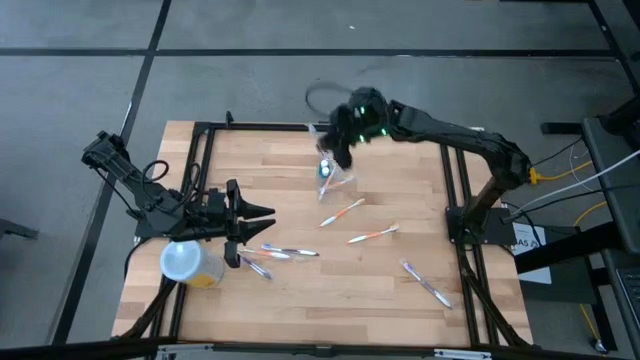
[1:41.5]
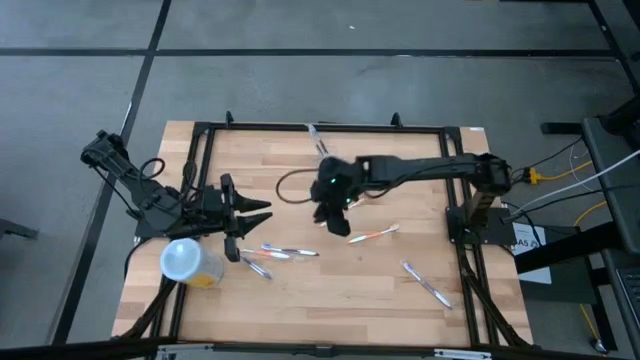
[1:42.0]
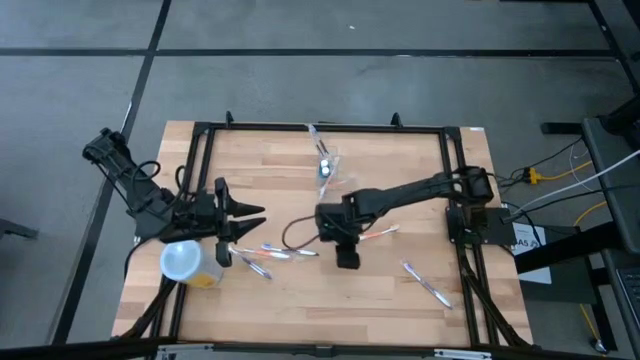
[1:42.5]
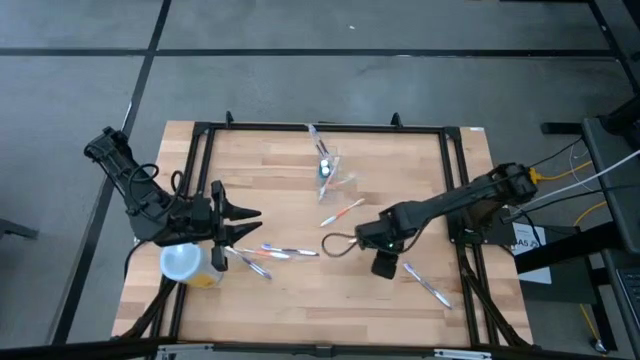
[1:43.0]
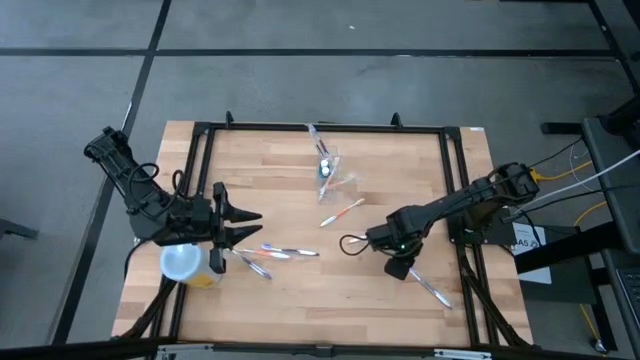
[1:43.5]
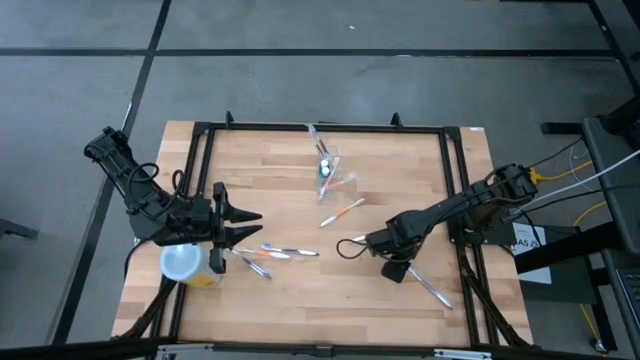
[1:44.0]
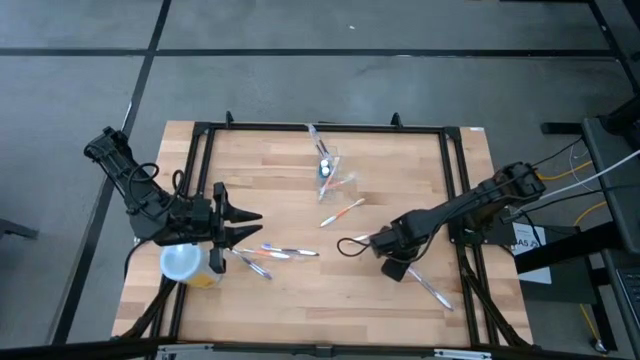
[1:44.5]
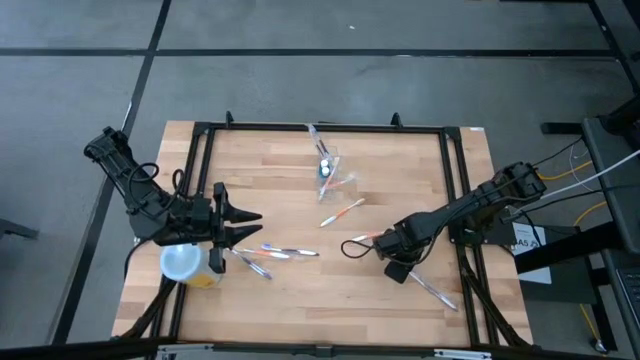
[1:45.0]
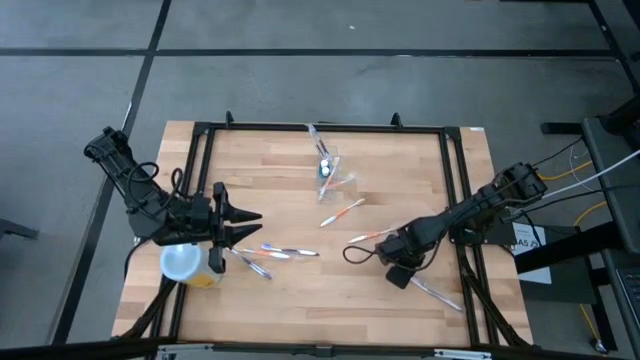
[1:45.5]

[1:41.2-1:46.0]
Task: Pick & Place toothbrushing station
Put the purple toothbrush into the transparent organizer

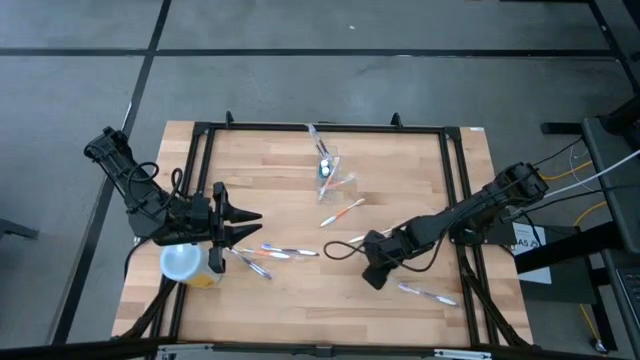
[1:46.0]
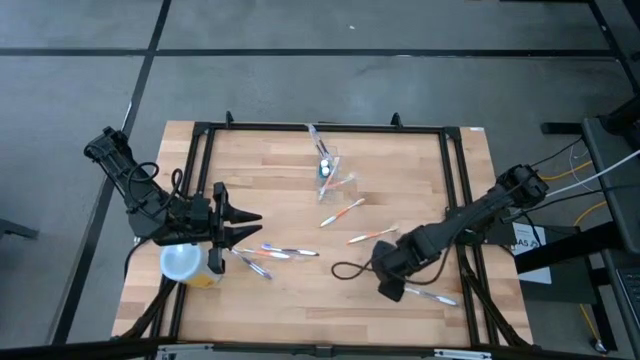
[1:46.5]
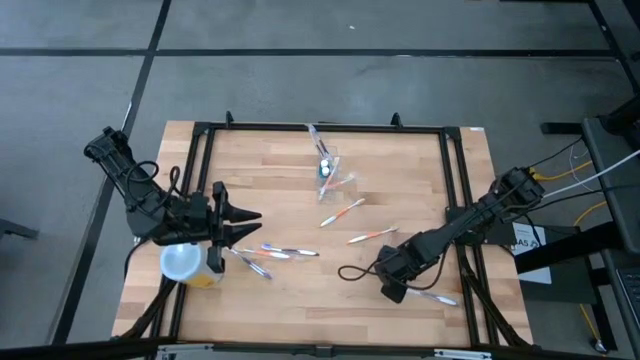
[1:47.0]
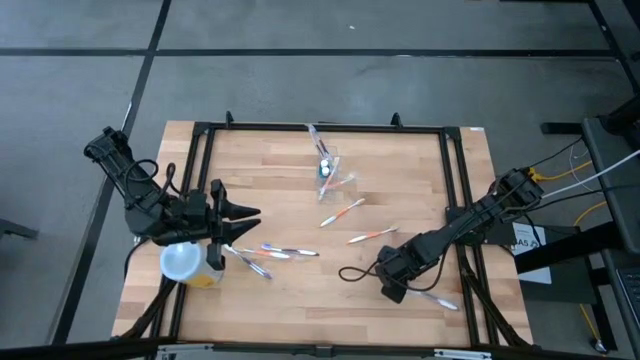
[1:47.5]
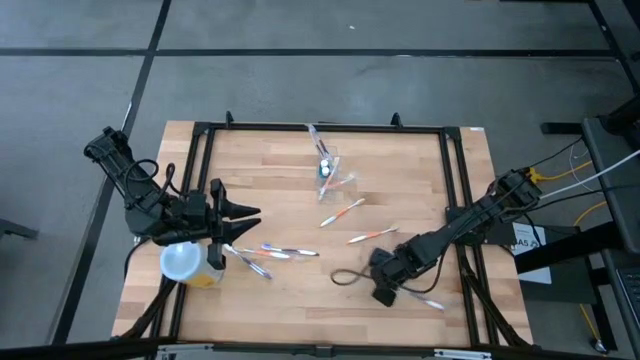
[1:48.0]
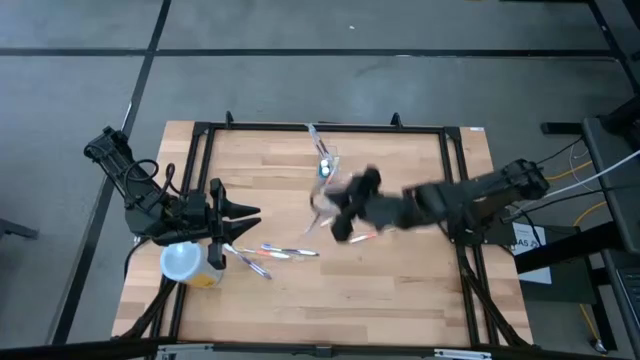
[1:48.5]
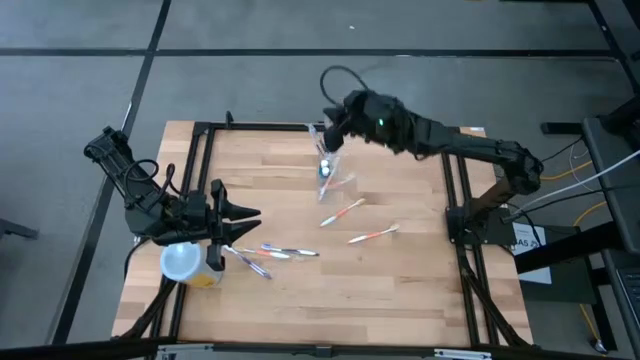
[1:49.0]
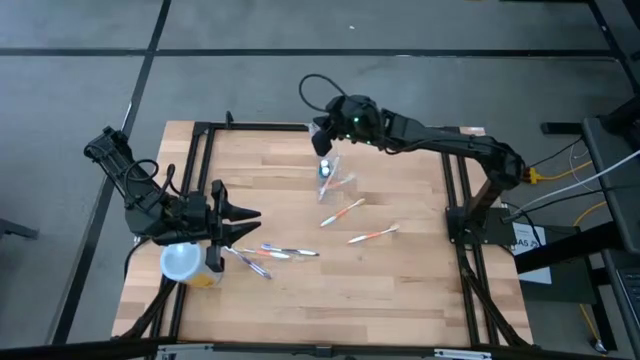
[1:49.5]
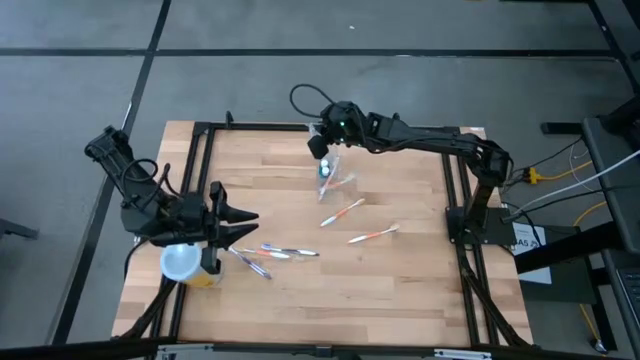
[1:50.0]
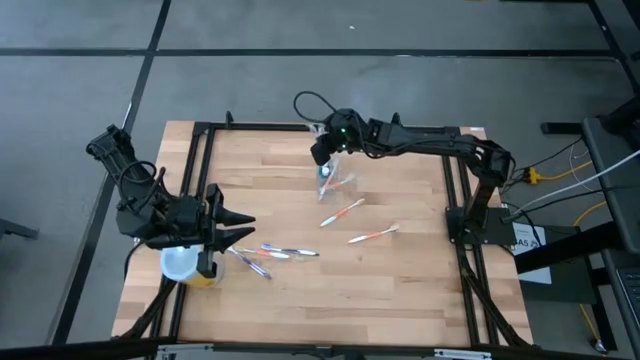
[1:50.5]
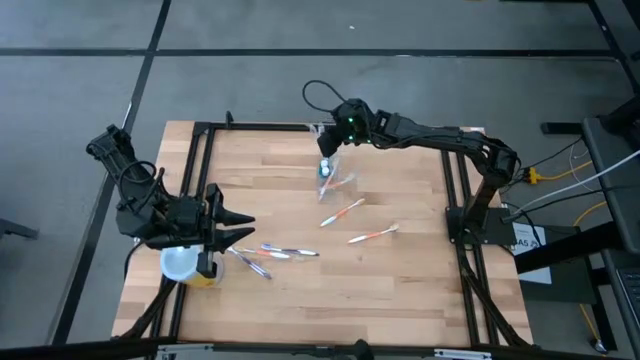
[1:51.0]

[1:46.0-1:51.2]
Put the purple toothbrush into the transparent organizer

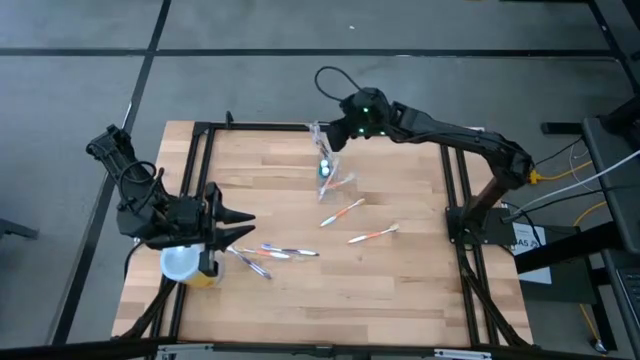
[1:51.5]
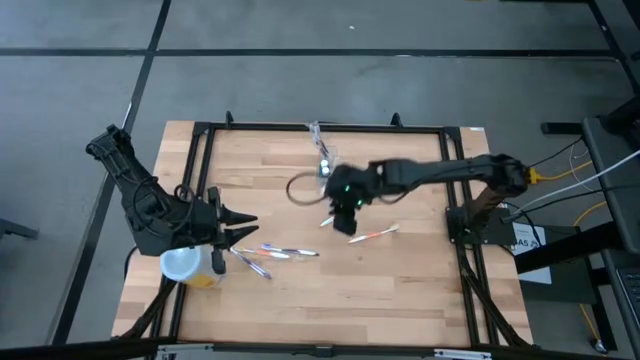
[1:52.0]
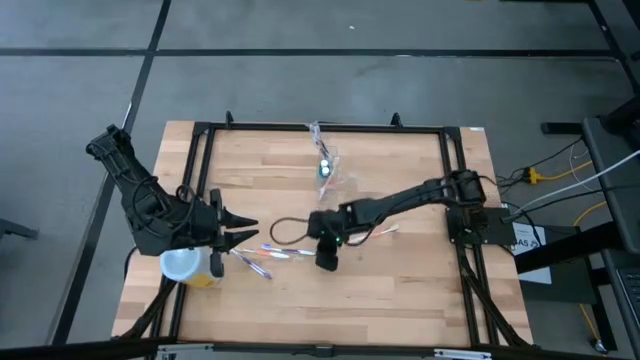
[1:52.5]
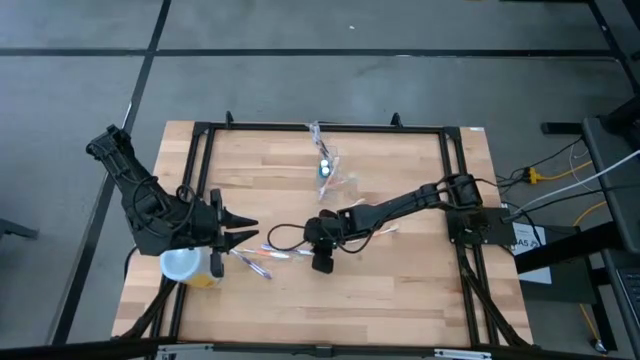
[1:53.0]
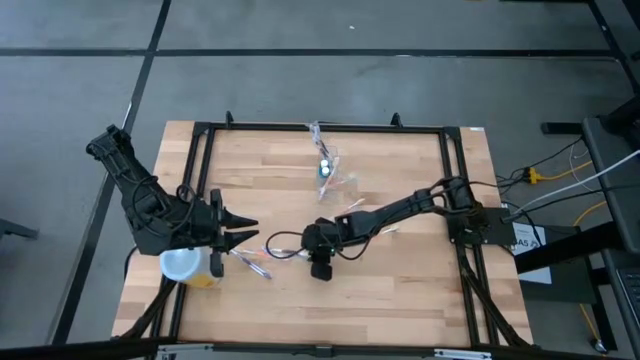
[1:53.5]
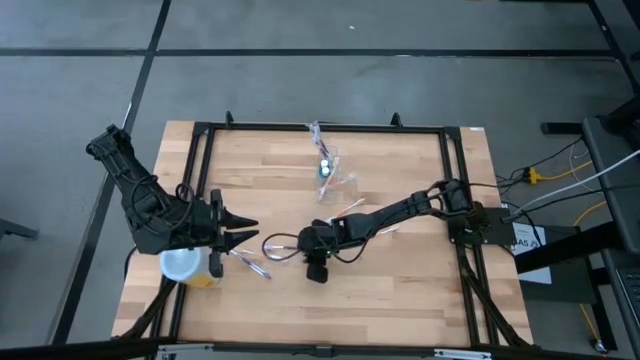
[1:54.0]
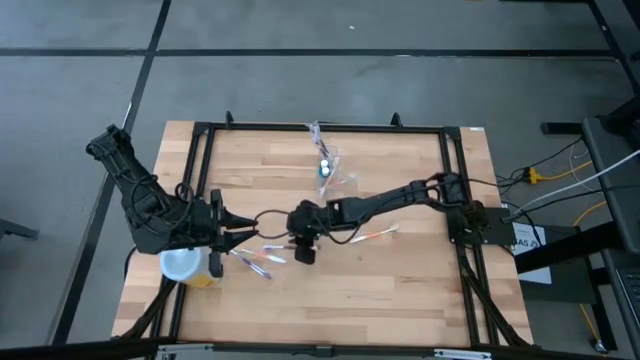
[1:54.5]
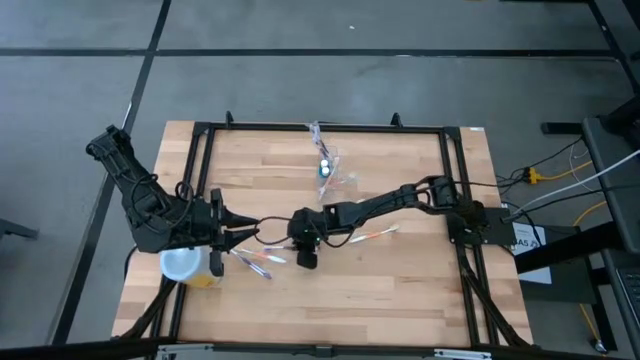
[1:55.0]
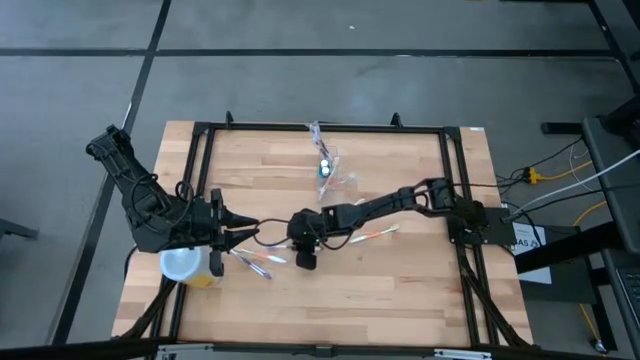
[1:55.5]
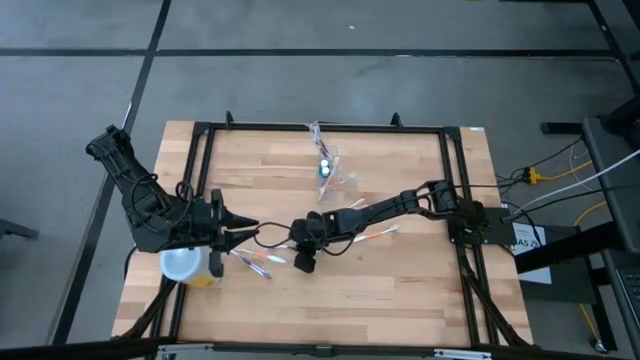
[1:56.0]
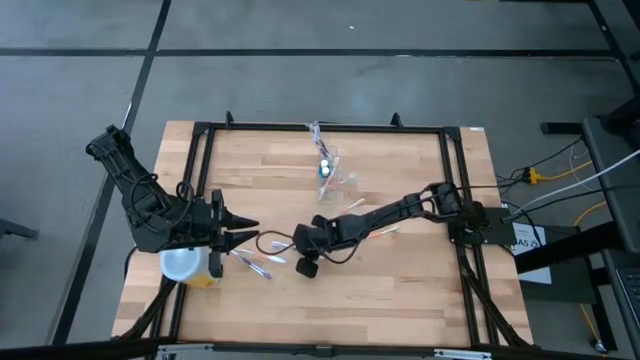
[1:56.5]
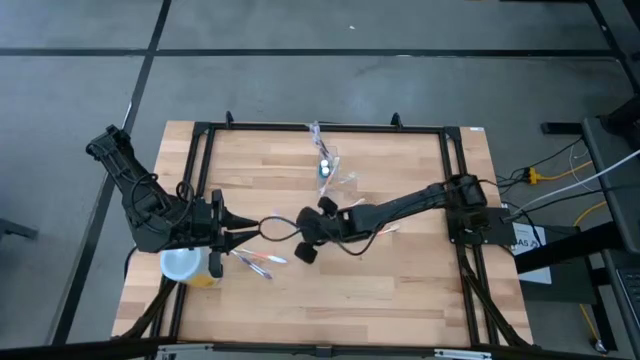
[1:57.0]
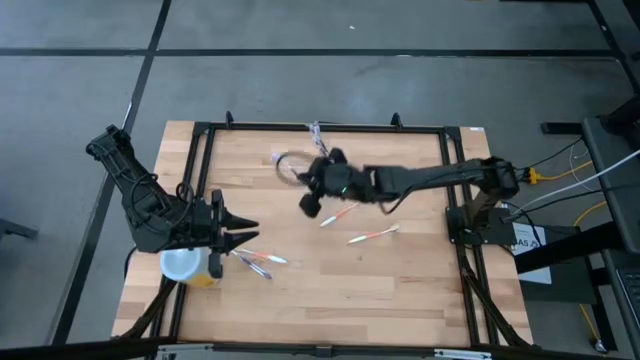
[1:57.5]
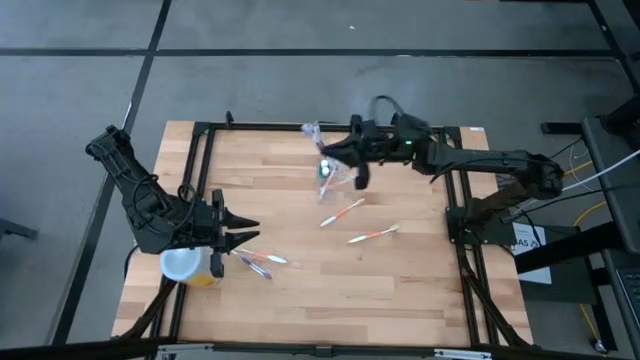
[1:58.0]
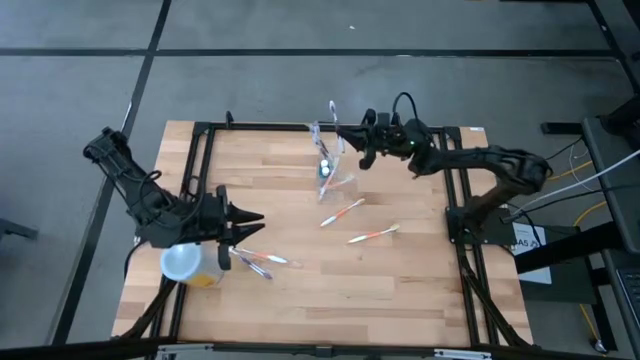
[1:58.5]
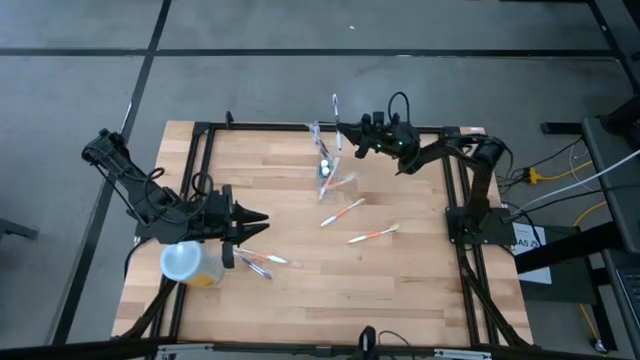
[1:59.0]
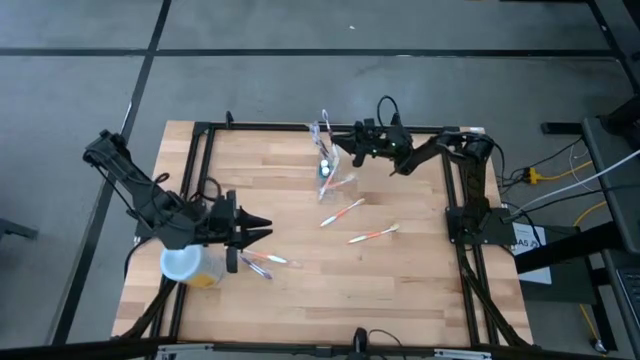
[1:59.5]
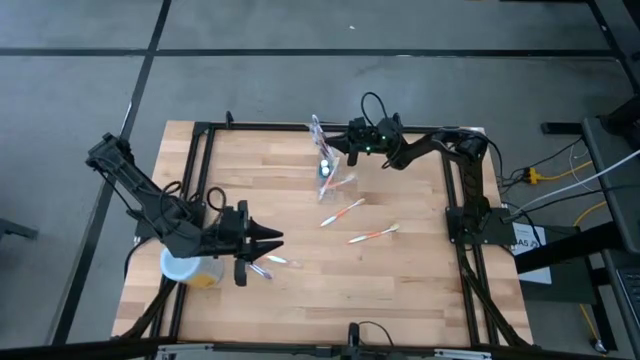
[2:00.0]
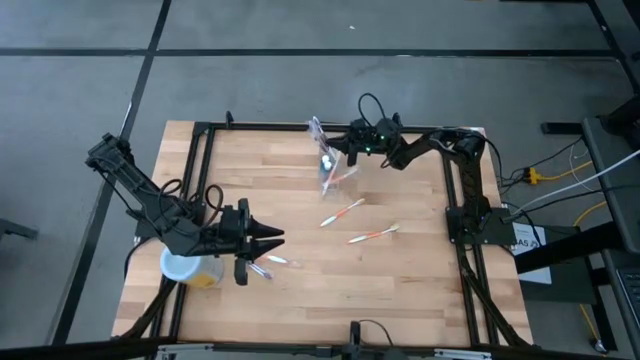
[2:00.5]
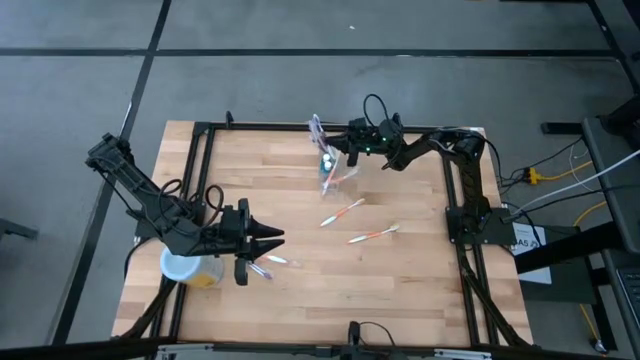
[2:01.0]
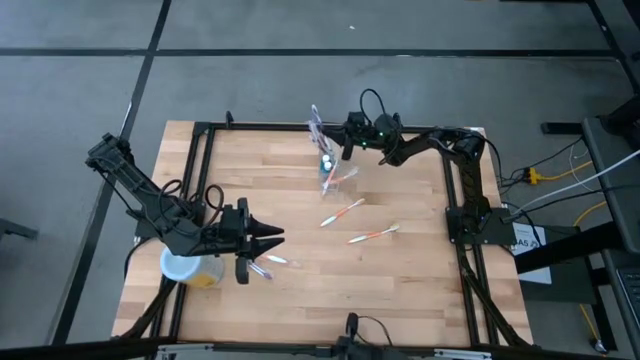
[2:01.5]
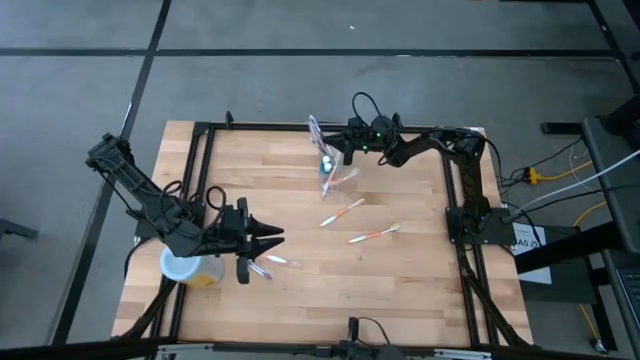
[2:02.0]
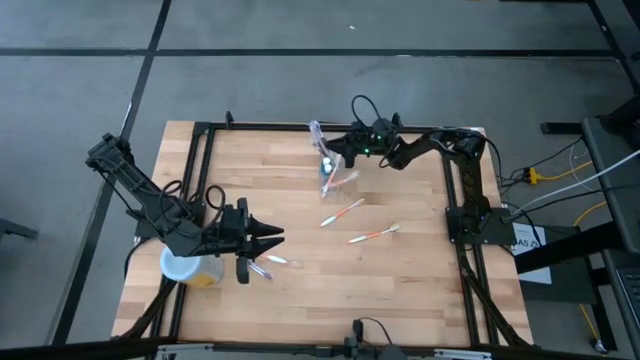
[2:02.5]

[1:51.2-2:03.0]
Put the purple toothbrush into the transparent organizer
